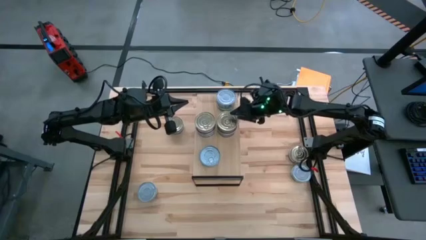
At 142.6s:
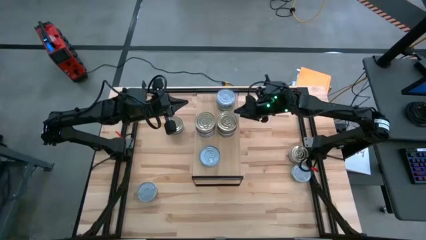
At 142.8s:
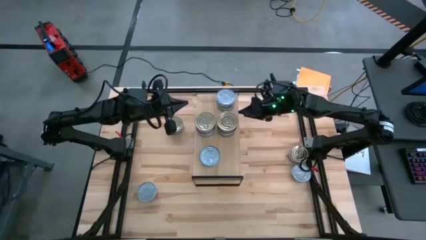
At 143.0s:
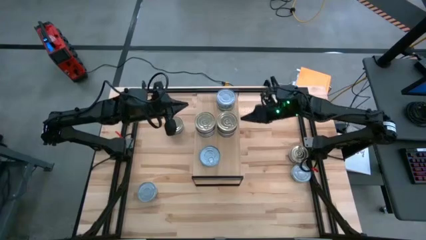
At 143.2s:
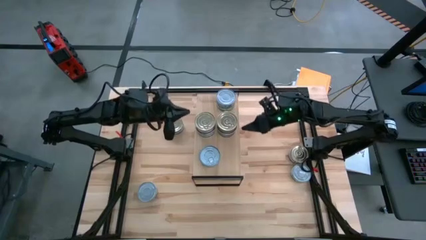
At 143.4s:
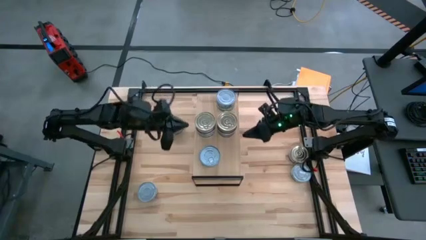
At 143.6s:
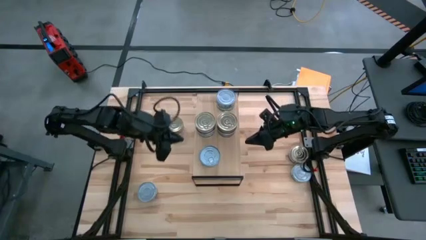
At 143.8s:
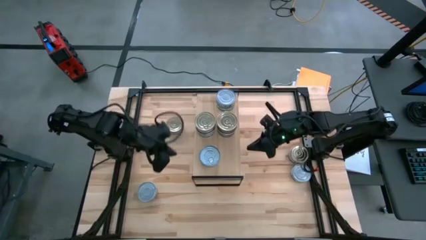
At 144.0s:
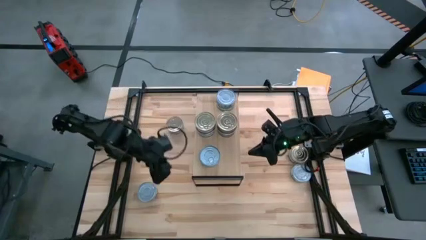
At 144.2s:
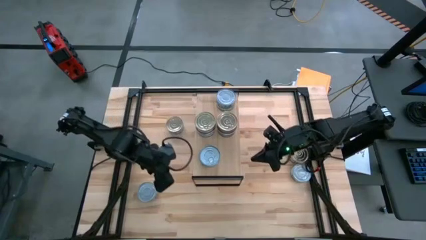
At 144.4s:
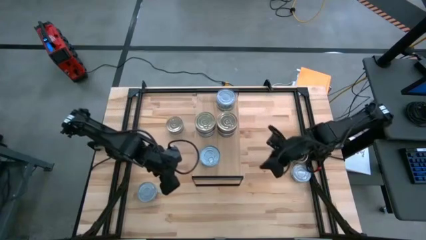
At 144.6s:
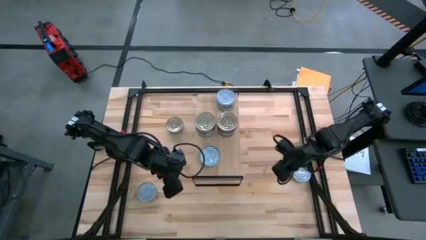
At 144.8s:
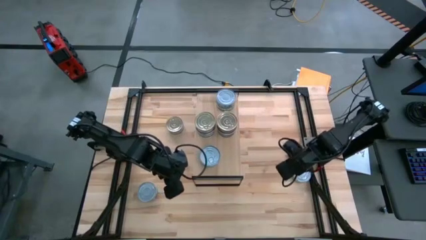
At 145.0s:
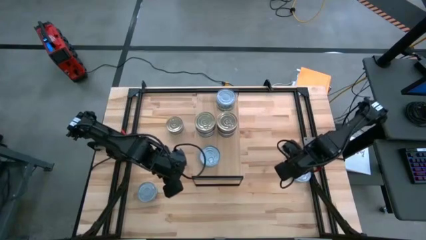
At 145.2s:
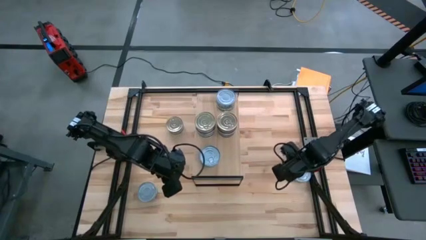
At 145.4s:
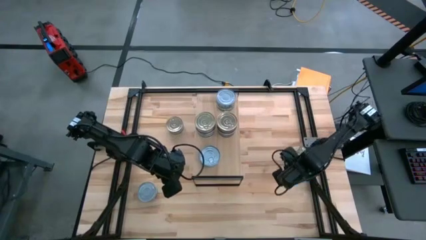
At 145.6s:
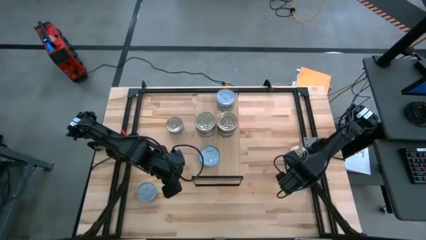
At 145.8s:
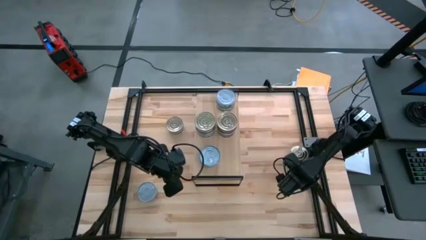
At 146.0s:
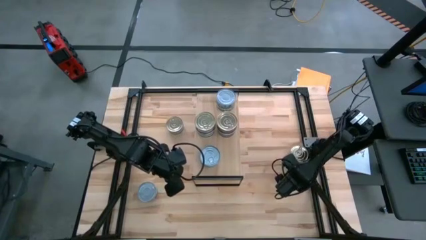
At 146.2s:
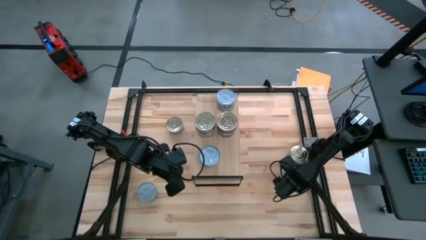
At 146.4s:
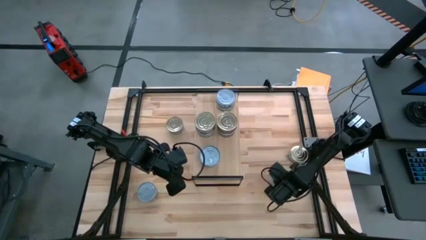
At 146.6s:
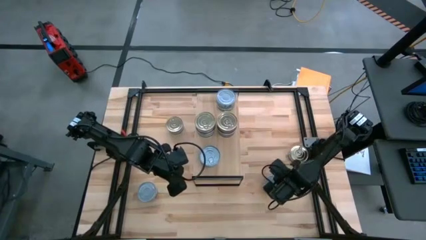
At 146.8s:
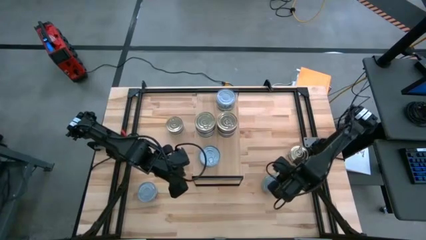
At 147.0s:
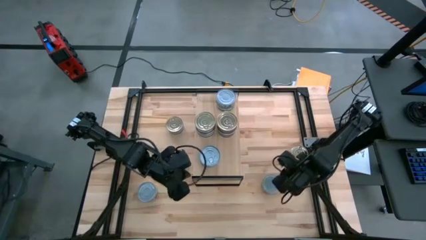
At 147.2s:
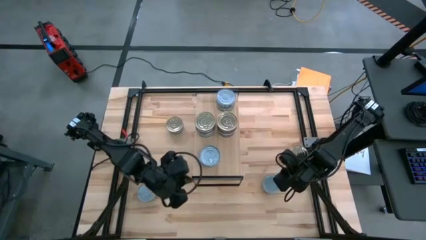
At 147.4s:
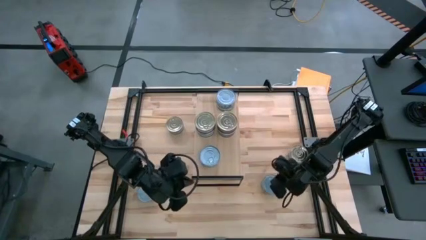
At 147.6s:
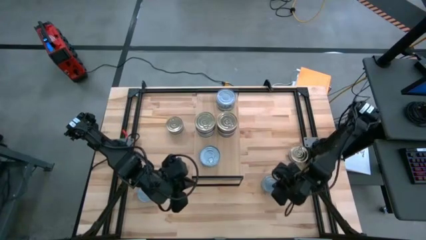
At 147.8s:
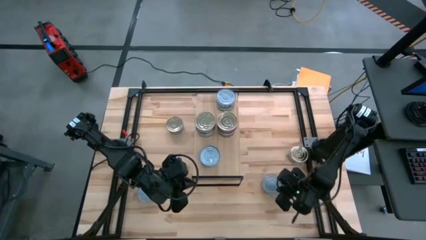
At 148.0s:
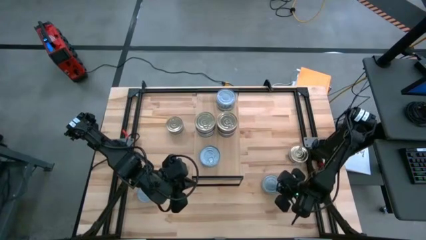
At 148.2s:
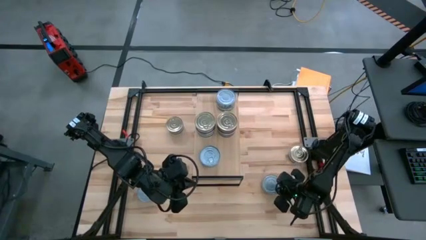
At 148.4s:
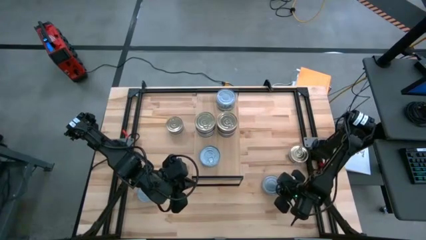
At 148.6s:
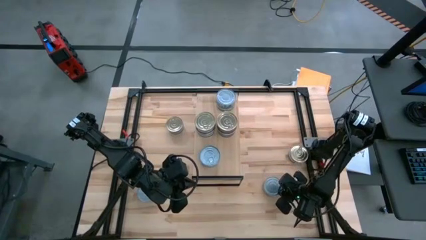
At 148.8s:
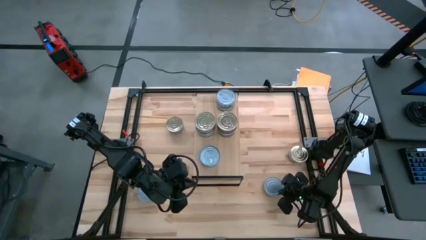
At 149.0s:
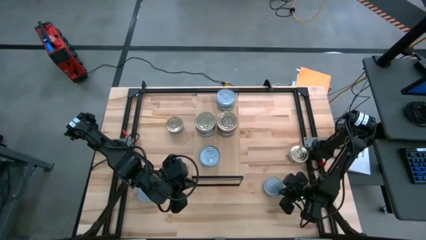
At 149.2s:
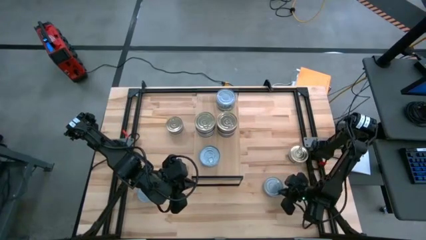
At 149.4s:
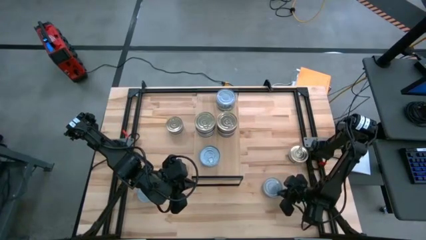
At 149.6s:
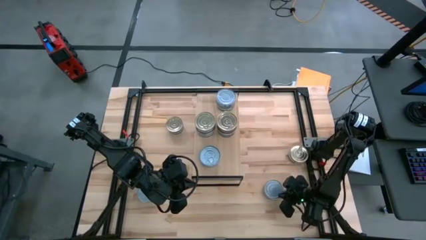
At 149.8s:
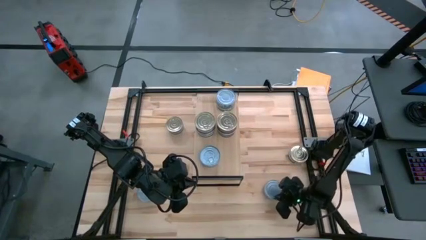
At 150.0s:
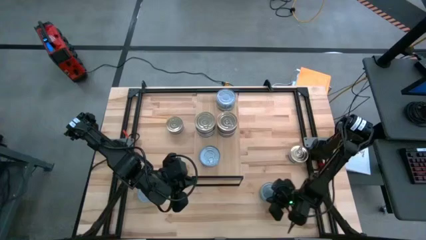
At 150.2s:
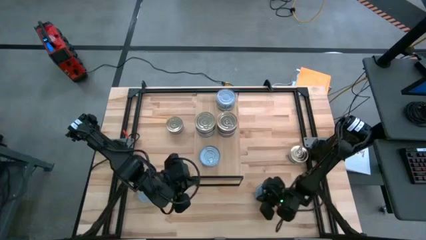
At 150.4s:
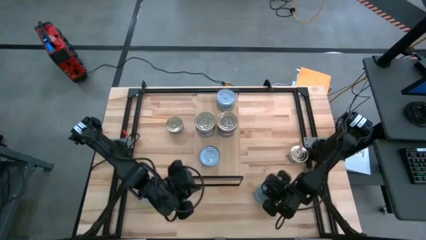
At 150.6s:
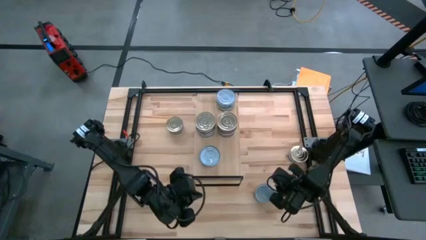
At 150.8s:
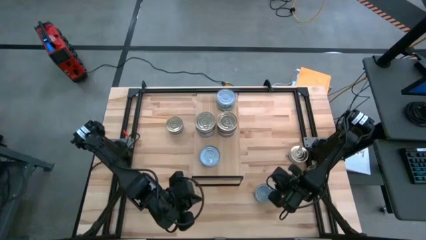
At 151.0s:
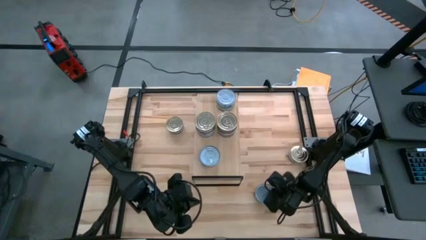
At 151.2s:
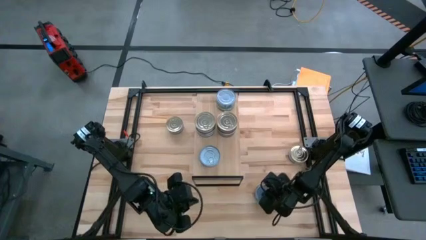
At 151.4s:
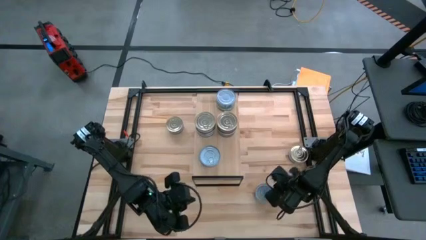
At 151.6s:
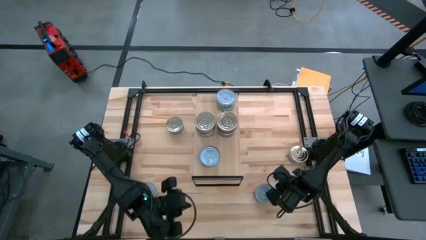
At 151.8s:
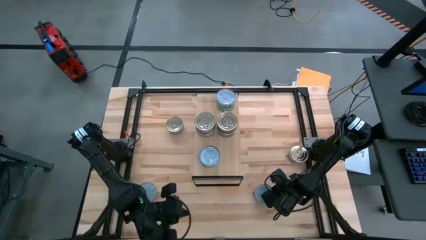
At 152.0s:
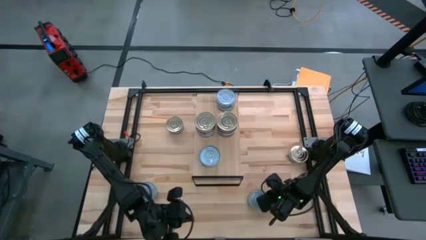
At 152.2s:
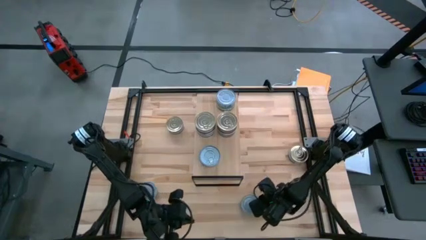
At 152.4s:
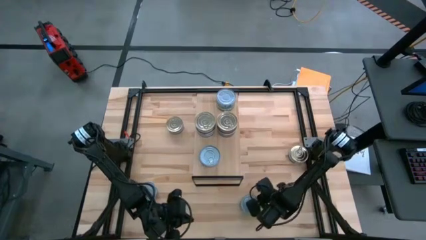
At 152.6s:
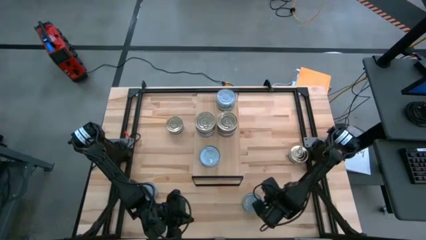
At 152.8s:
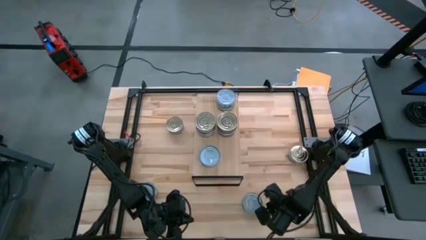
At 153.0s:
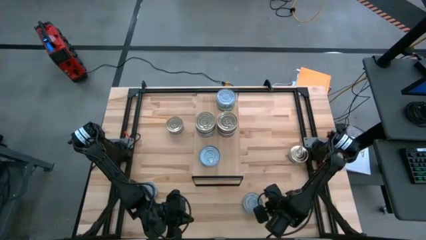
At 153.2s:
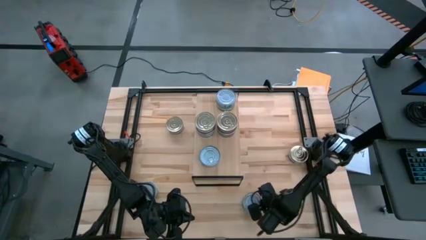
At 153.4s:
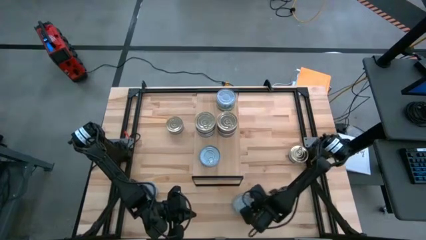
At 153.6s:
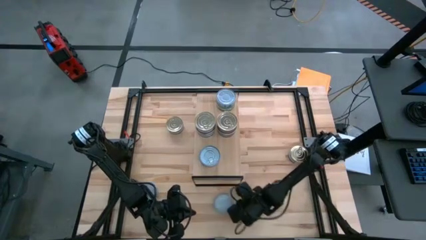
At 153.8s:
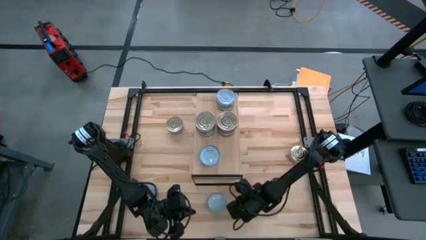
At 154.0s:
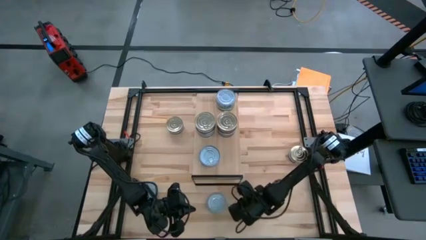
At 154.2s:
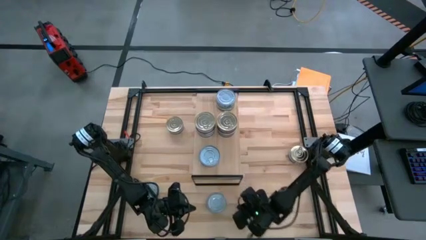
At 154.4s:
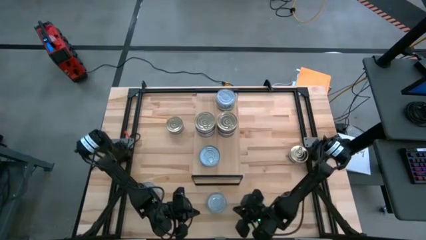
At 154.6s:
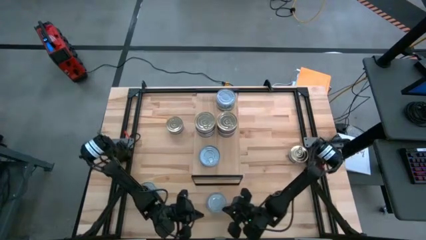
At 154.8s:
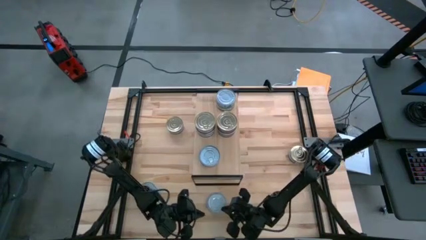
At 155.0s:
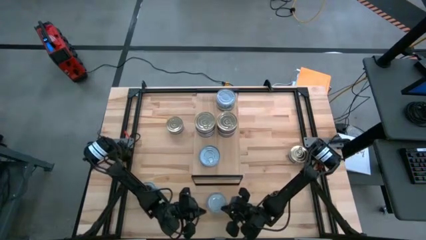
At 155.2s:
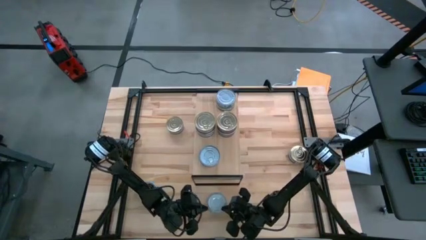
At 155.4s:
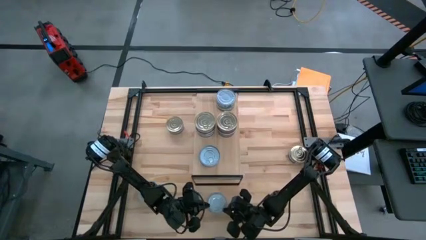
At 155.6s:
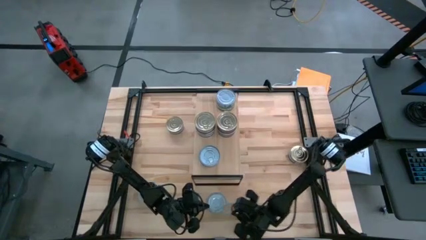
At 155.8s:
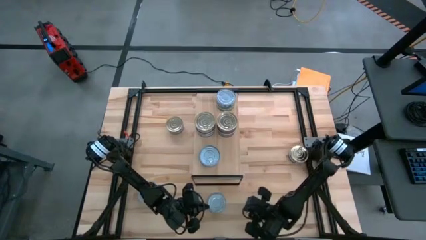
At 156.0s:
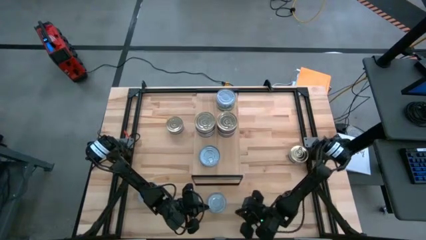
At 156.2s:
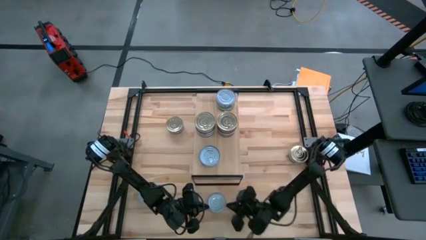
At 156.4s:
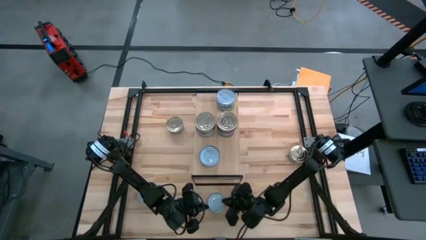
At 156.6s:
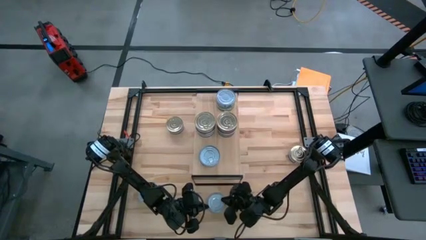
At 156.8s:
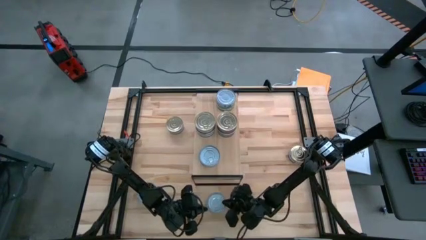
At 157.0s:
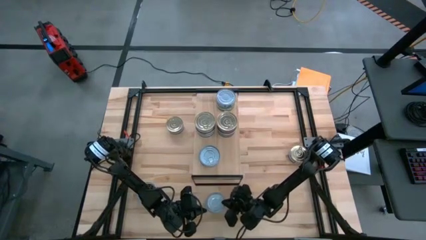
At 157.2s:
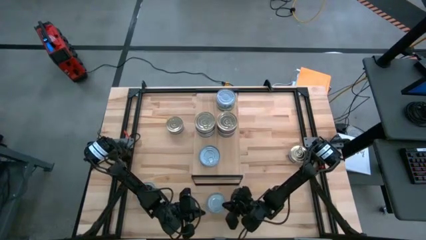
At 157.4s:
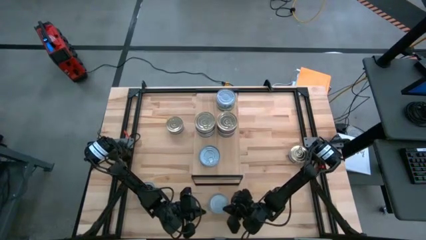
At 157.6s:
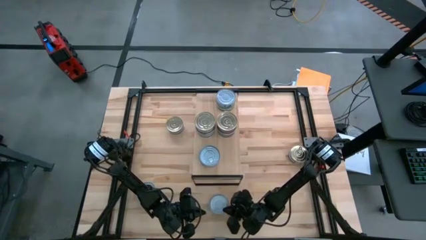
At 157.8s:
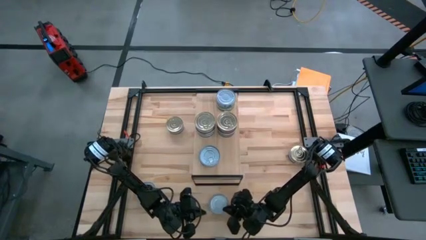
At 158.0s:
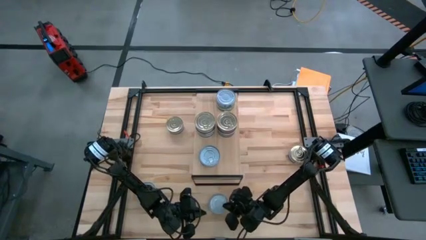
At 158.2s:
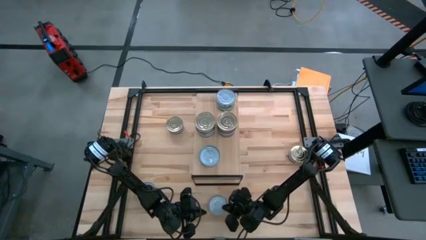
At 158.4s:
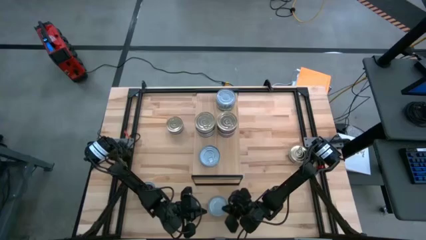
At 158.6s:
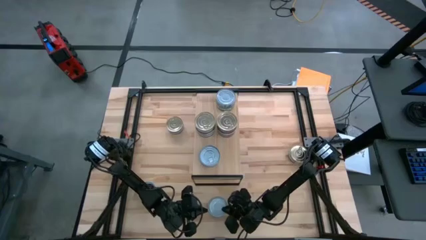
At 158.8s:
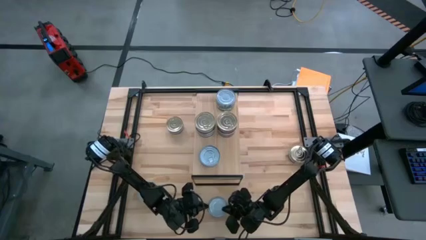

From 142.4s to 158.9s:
Task: Stack canned seafood by type on shelf
Stack the green tuna can on top of the green tuna can on the shelf
